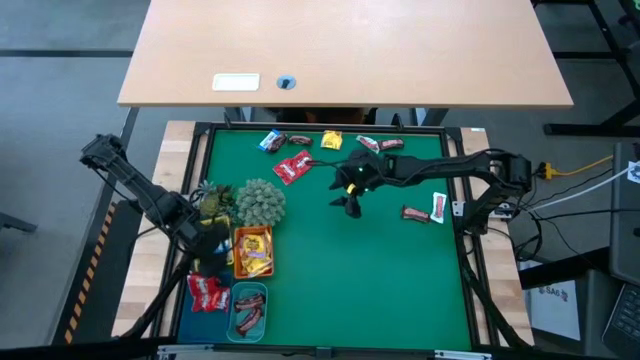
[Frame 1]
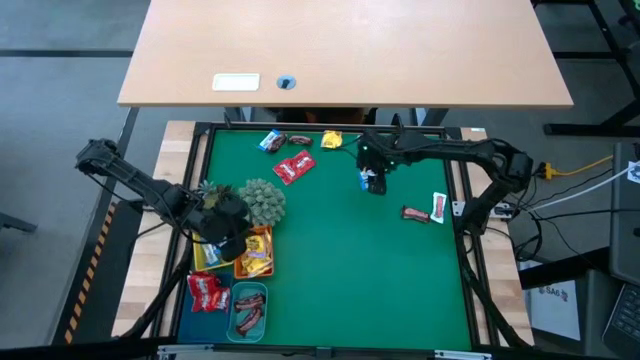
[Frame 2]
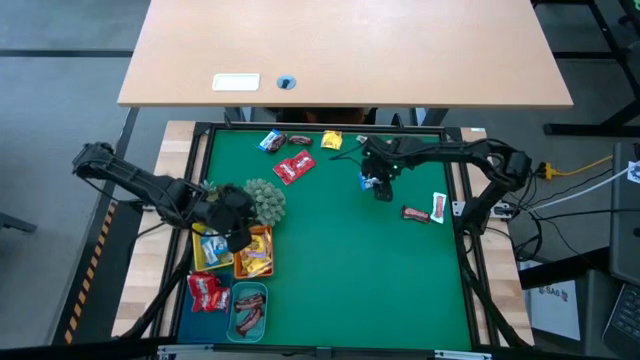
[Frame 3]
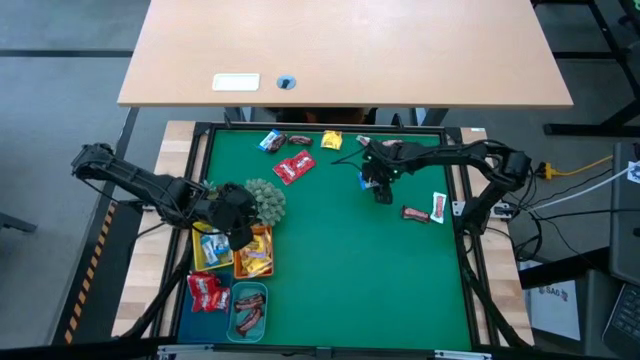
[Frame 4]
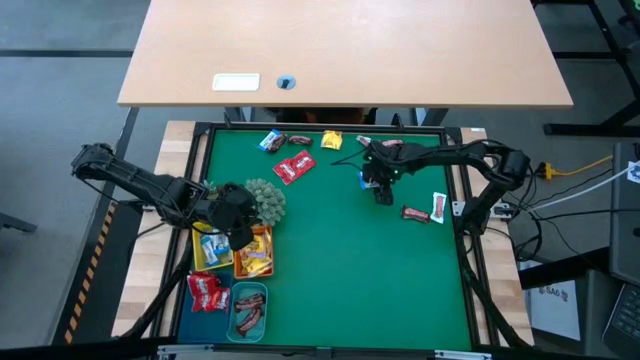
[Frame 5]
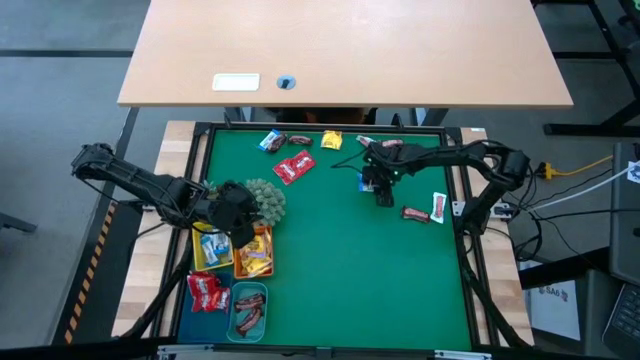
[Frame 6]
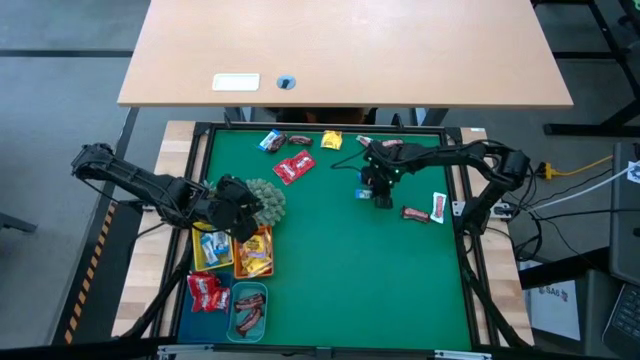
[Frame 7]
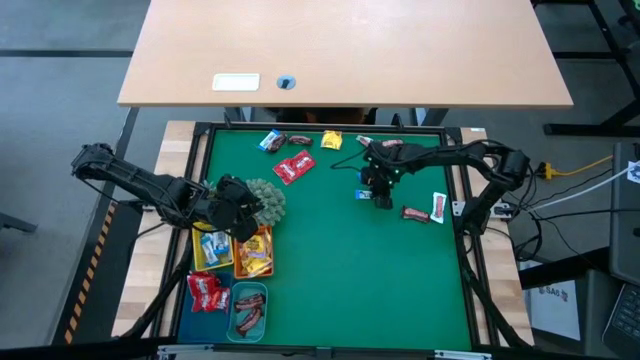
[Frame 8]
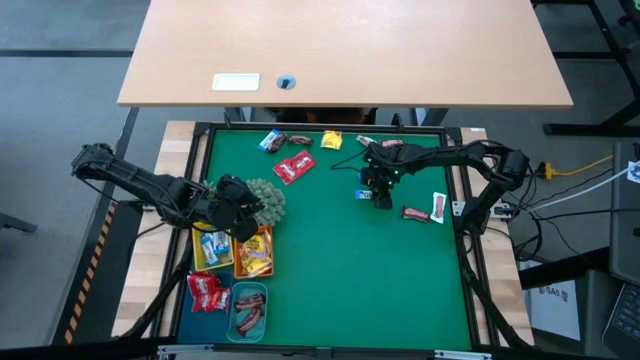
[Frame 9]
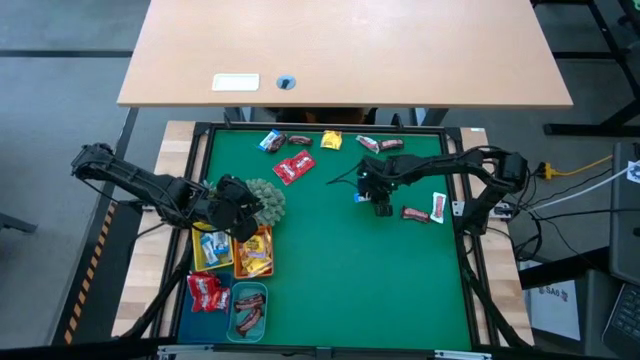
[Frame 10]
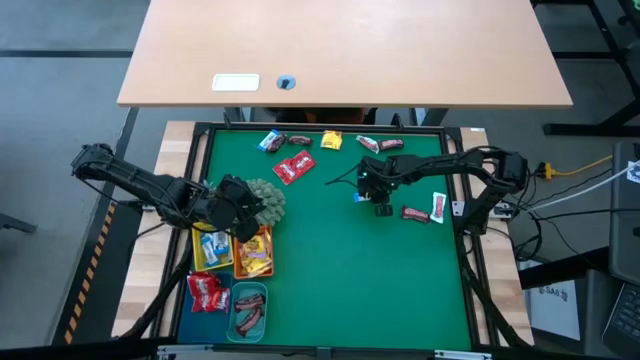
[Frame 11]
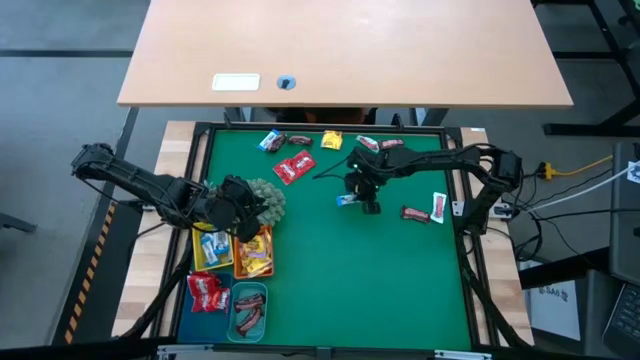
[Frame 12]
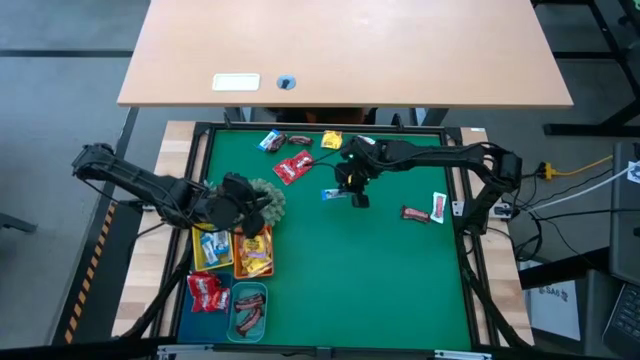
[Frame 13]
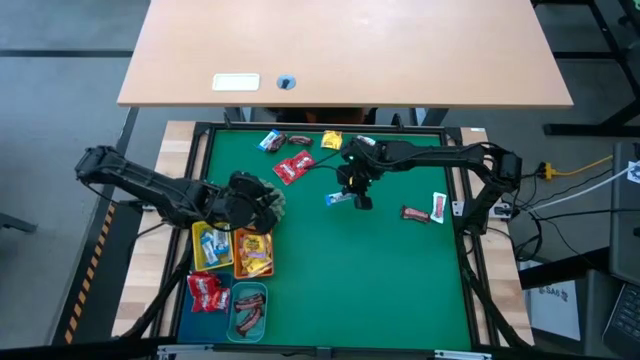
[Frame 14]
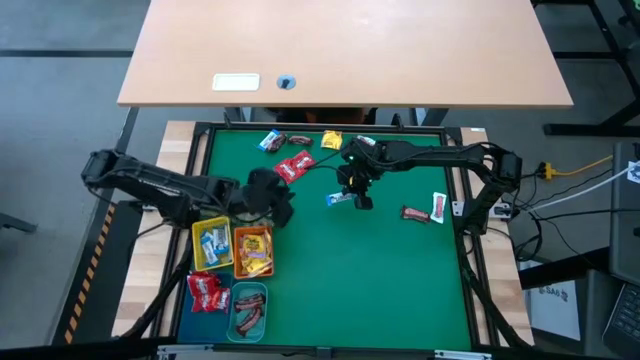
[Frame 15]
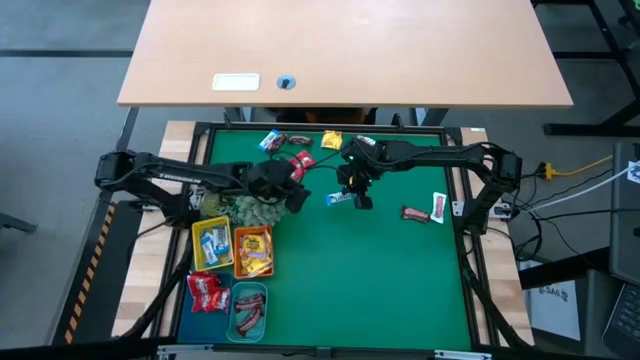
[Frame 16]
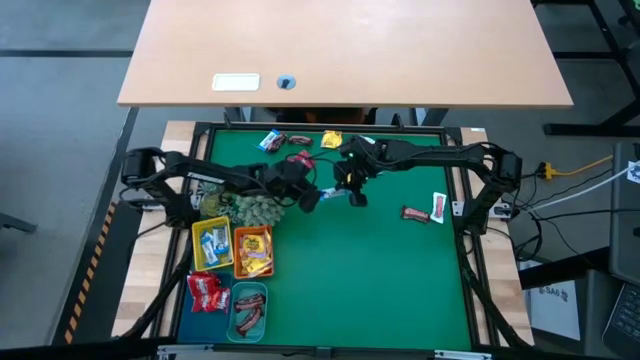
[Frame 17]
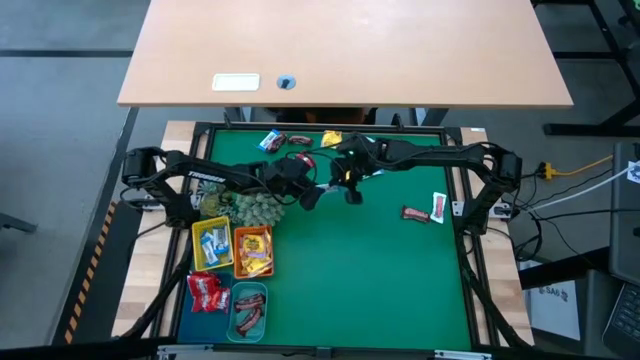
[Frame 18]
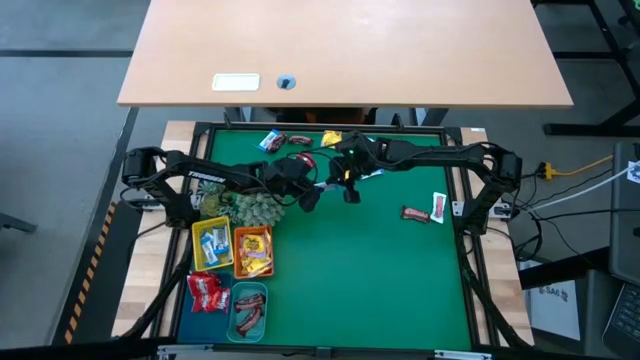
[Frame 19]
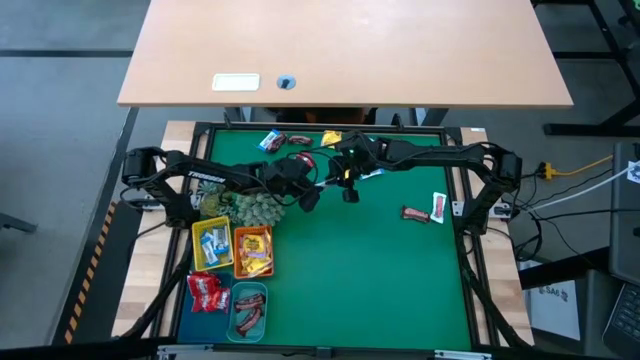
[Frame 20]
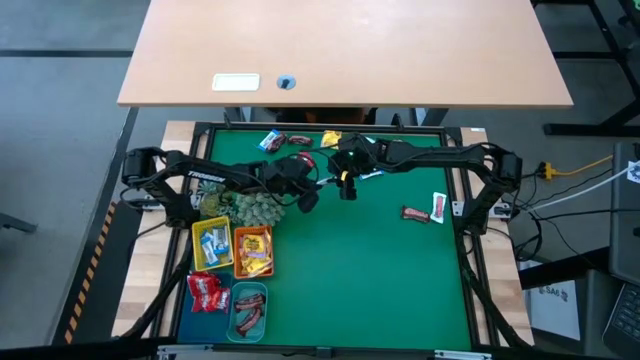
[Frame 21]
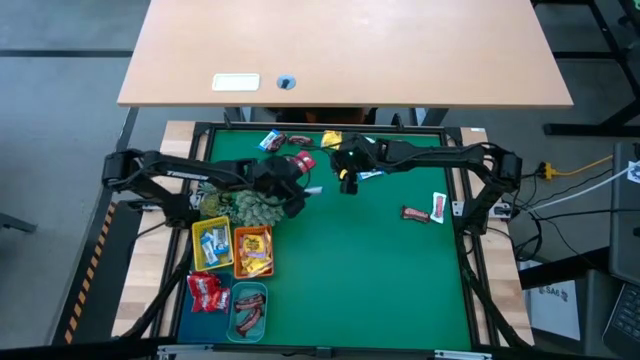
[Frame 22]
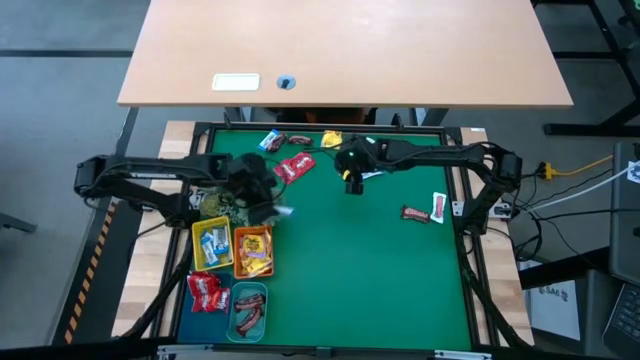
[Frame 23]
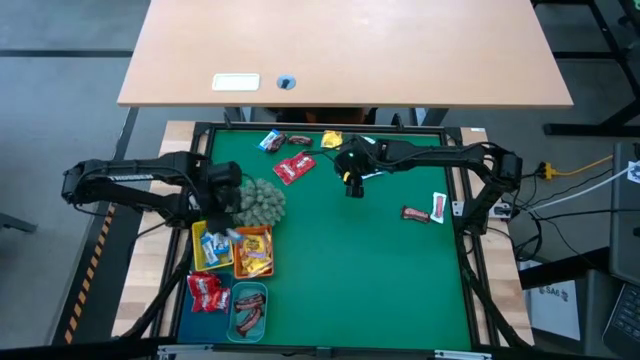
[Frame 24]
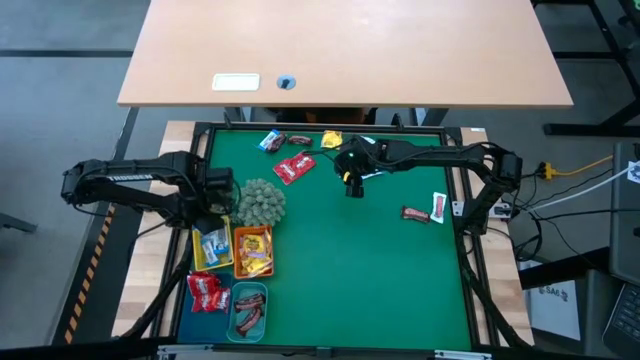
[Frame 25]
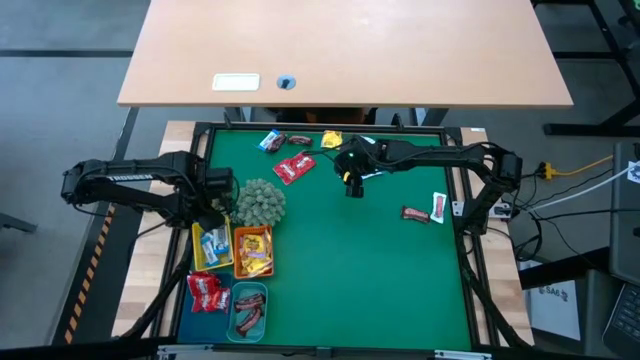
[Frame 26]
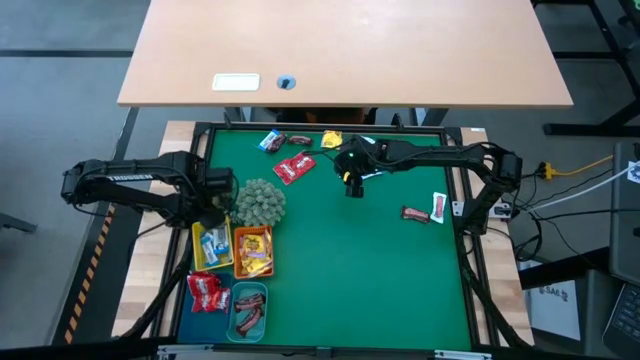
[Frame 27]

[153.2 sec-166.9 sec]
Task: Sort candy
Put the white chocolate into the yellow basket

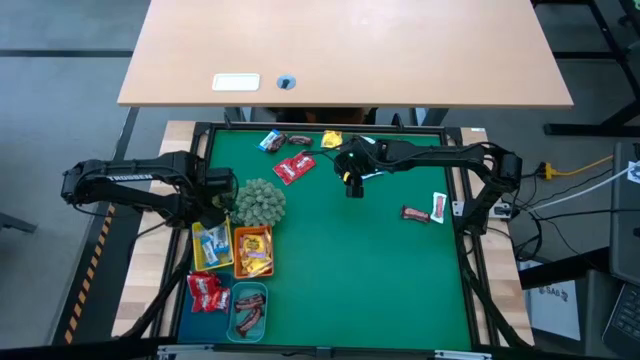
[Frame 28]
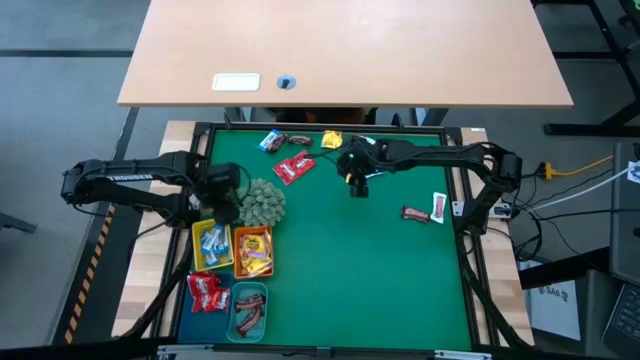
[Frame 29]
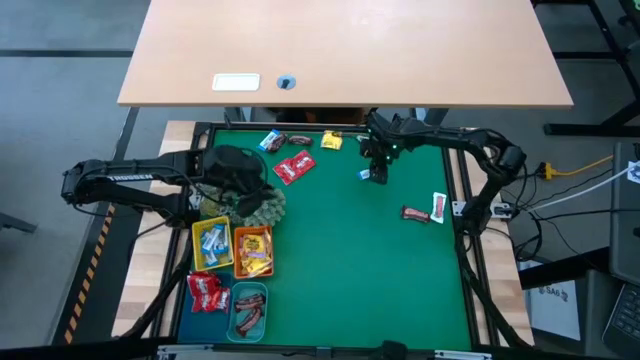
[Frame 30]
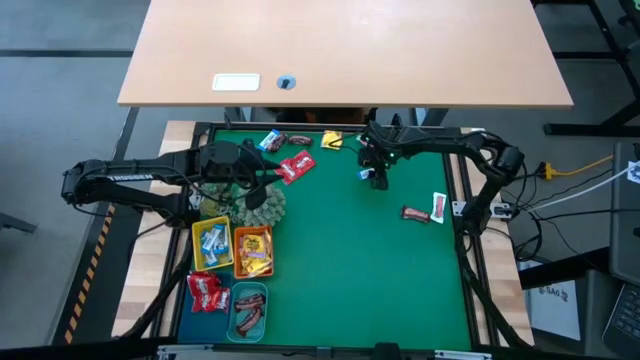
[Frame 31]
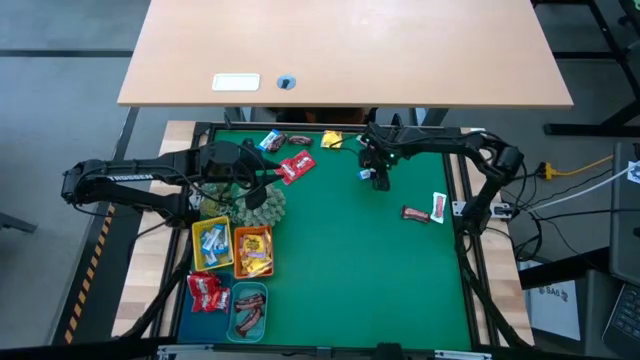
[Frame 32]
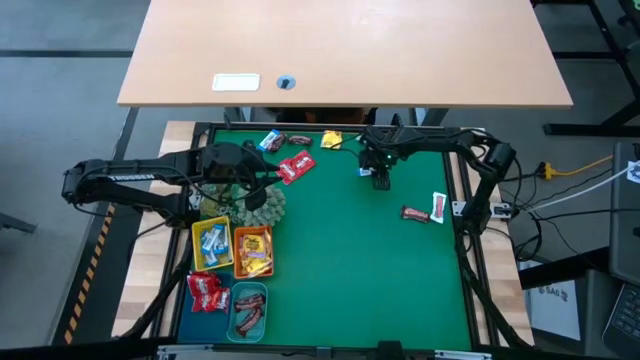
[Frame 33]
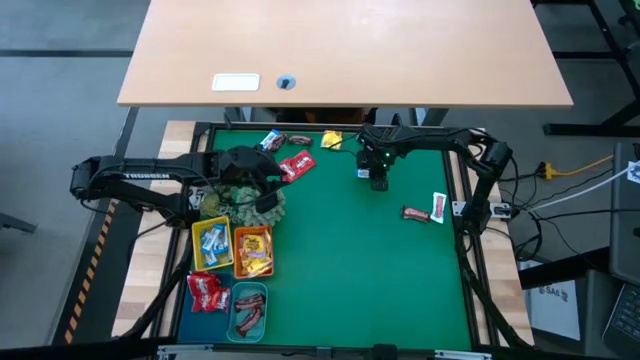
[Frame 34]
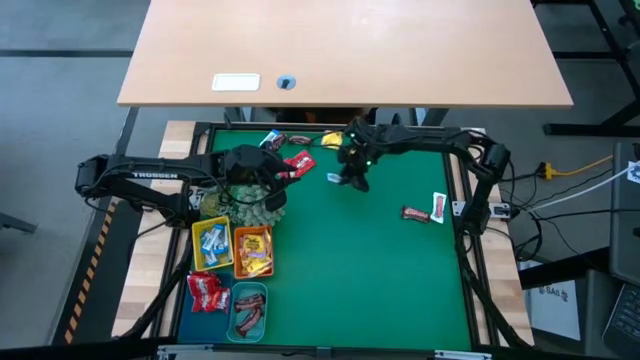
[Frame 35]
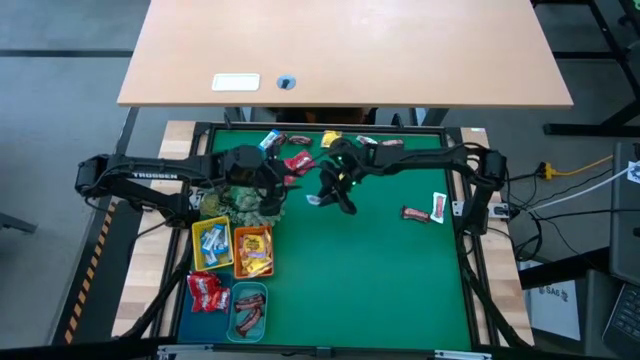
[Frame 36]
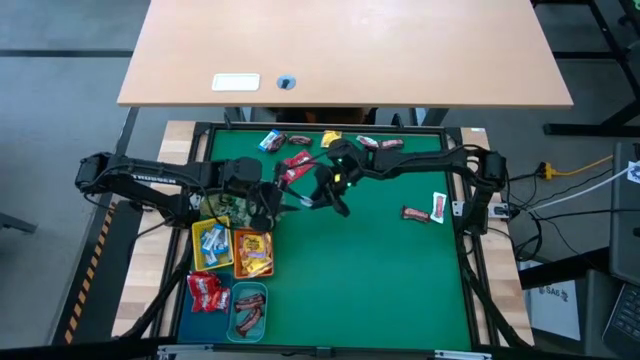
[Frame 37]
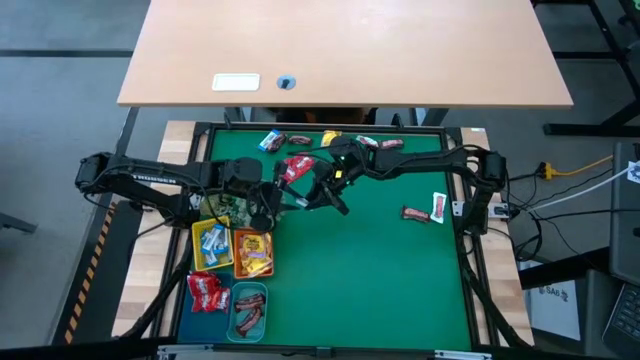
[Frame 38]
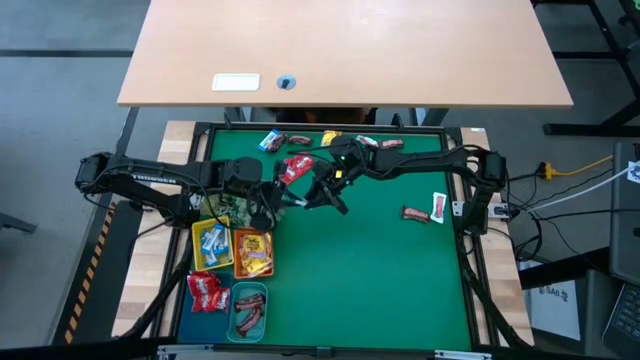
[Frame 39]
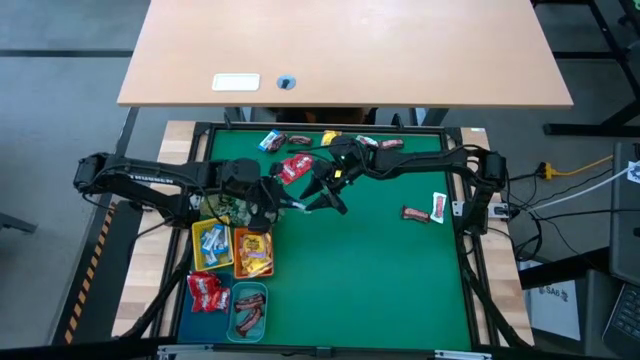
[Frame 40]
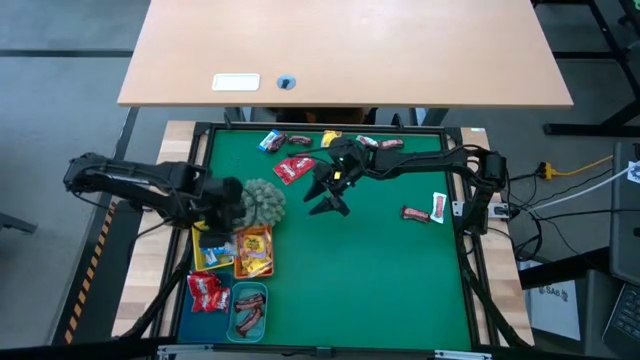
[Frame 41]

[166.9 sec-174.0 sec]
Put the white chocolate into the yellow basket

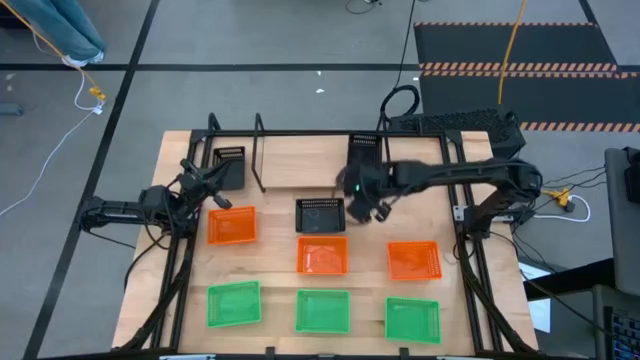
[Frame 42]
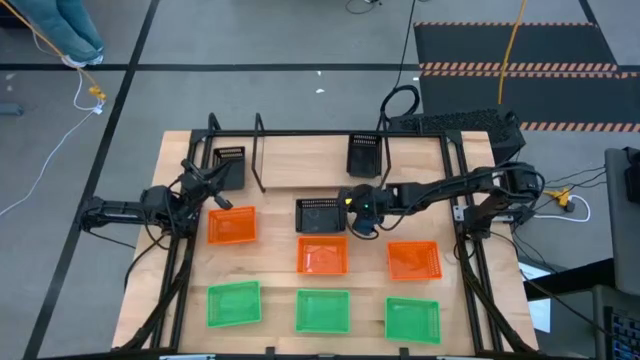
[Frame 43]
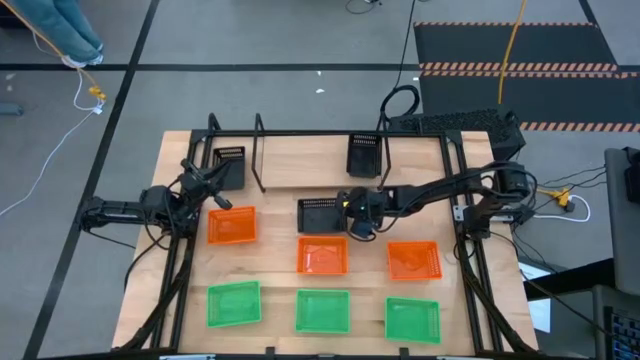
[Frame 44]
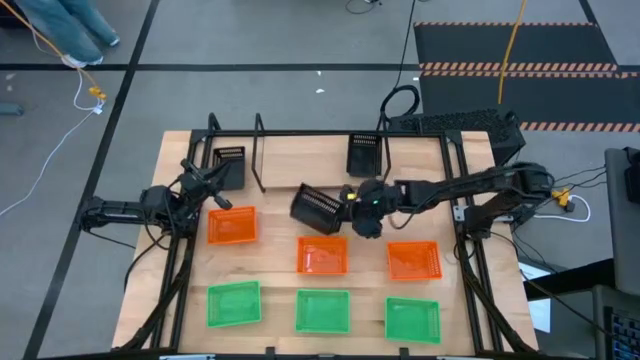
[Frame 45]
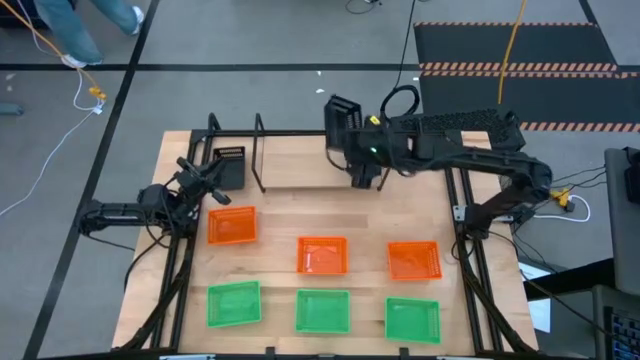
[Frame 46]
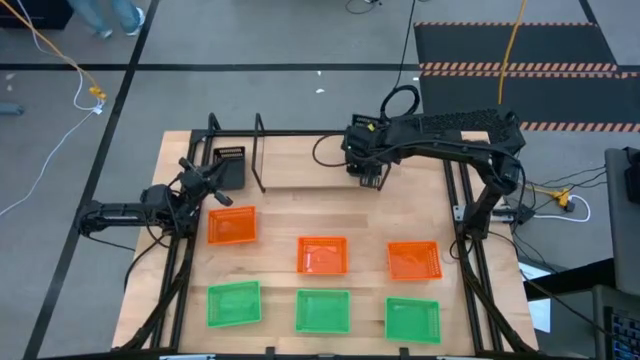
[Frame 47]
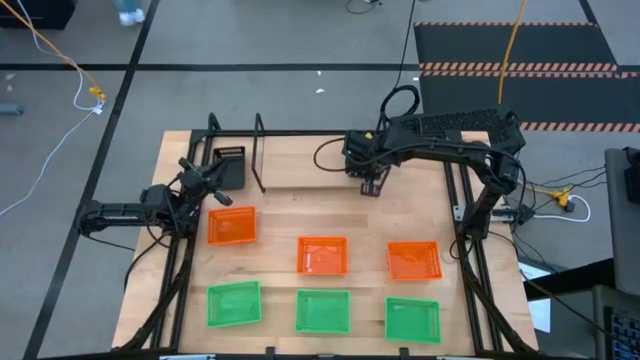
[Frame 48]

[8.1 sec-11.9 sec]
Task: Stack baskets on shelf by color
Stack the bottom black bin on top of the black bin on the shelf
